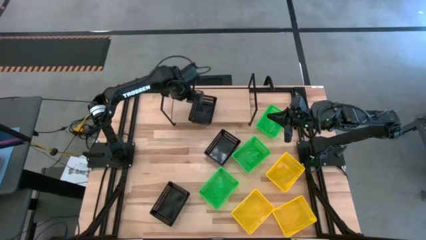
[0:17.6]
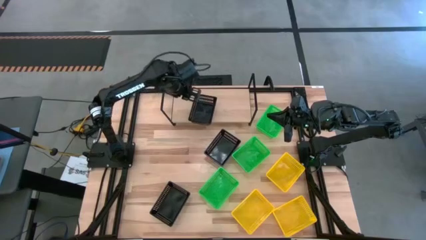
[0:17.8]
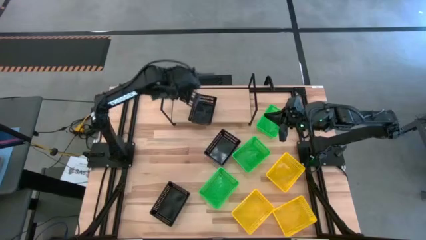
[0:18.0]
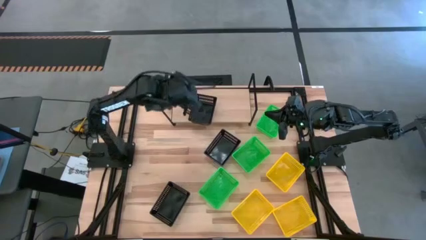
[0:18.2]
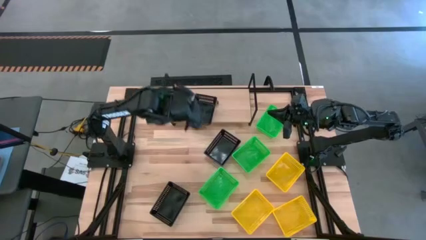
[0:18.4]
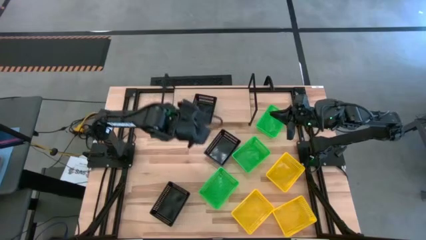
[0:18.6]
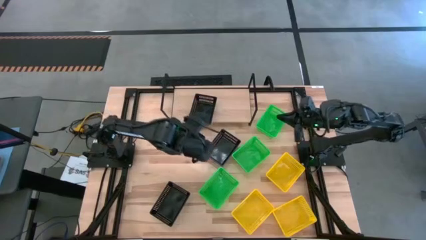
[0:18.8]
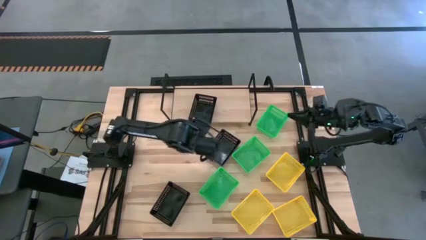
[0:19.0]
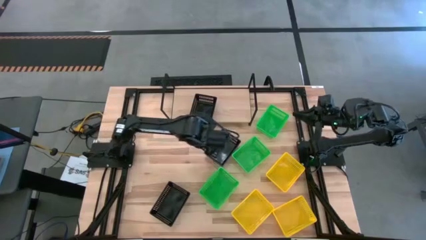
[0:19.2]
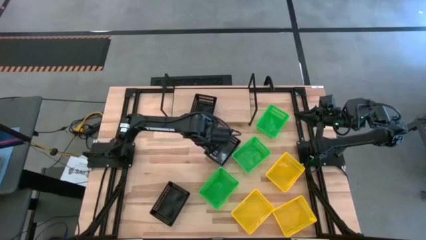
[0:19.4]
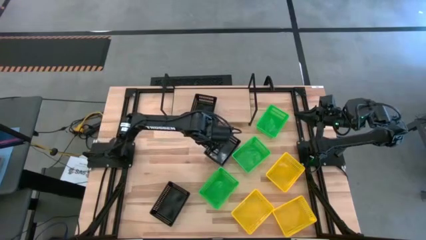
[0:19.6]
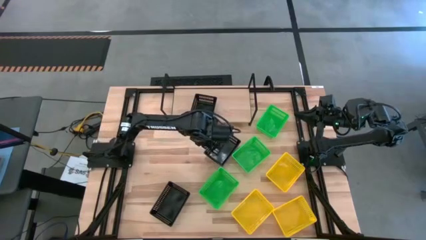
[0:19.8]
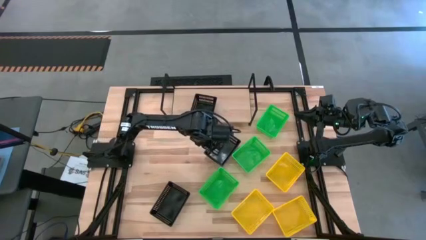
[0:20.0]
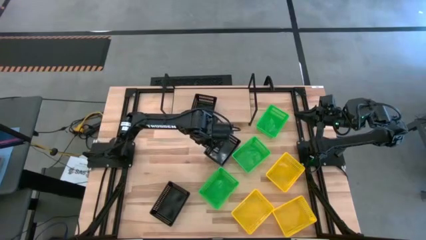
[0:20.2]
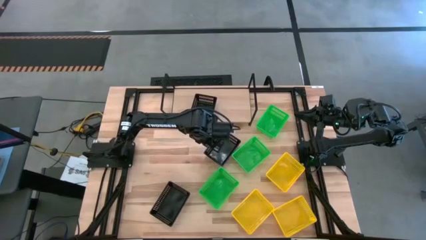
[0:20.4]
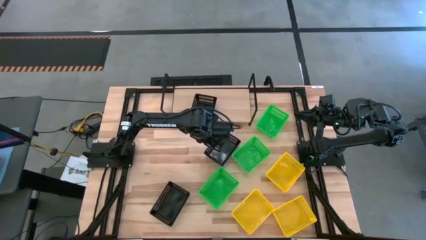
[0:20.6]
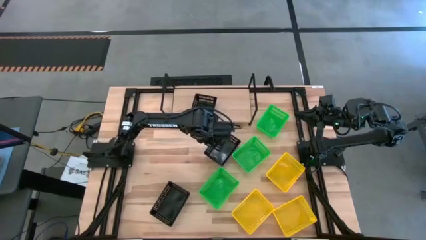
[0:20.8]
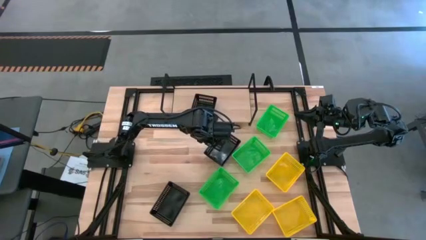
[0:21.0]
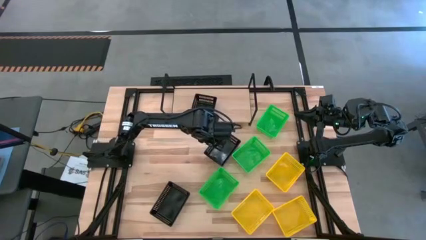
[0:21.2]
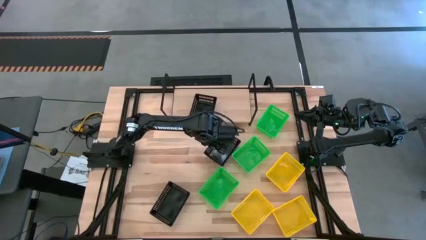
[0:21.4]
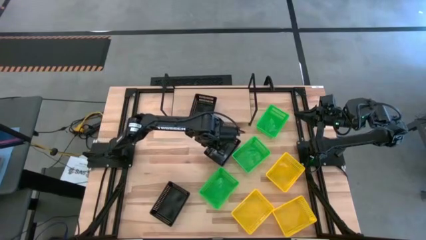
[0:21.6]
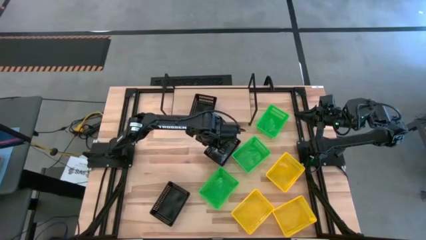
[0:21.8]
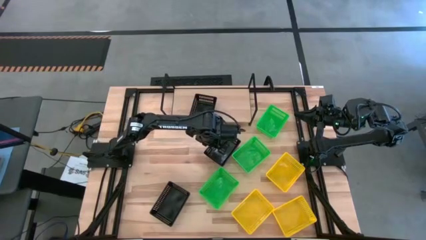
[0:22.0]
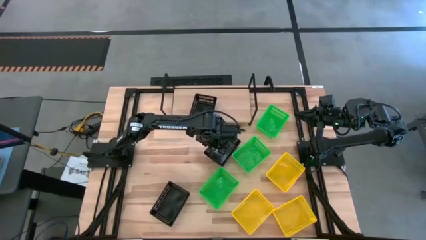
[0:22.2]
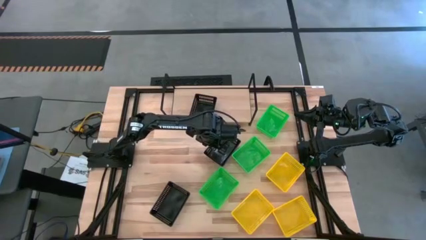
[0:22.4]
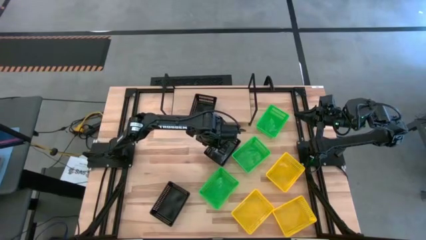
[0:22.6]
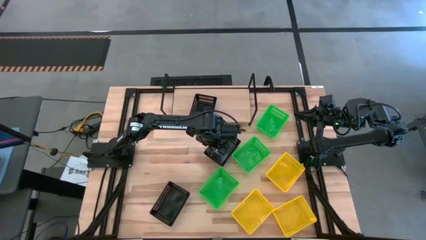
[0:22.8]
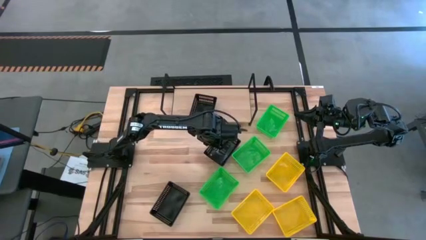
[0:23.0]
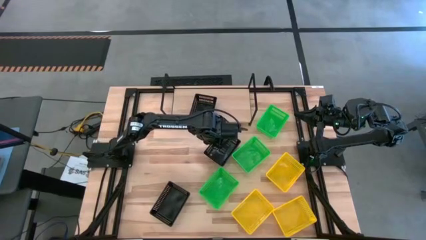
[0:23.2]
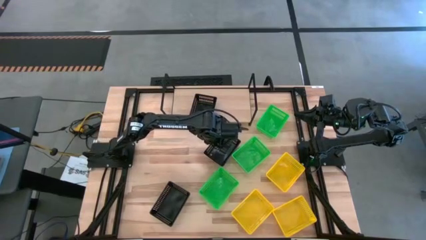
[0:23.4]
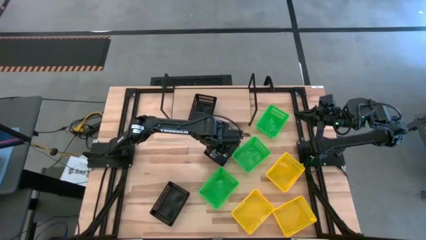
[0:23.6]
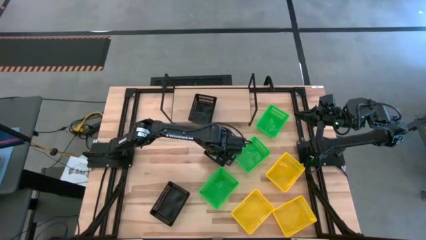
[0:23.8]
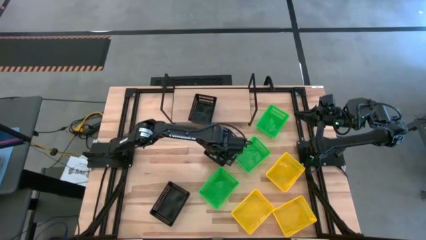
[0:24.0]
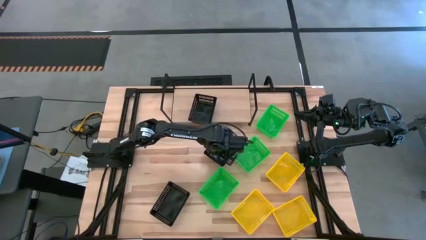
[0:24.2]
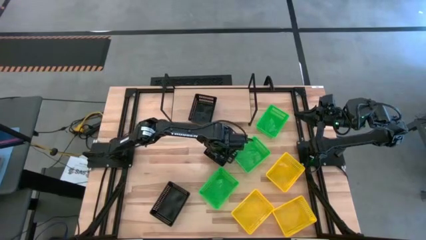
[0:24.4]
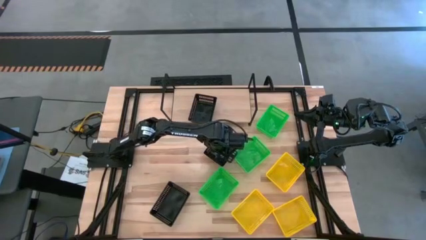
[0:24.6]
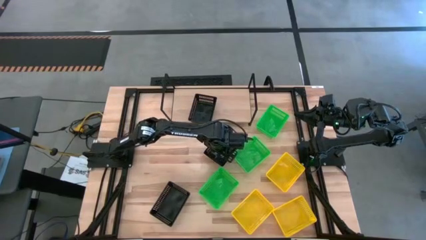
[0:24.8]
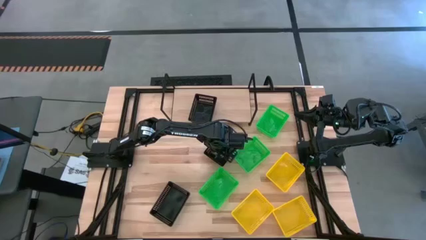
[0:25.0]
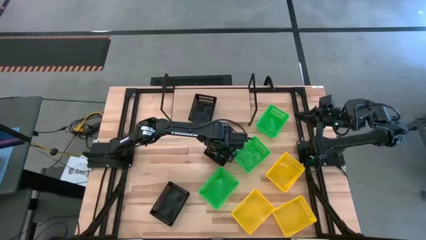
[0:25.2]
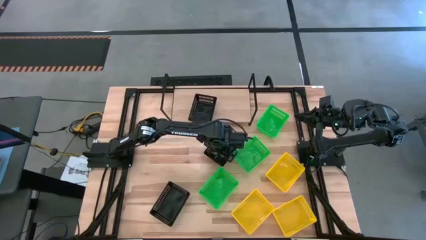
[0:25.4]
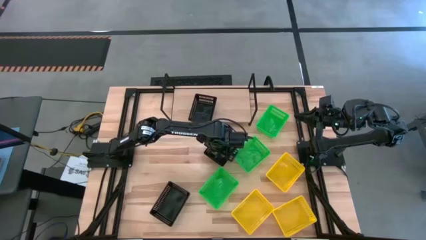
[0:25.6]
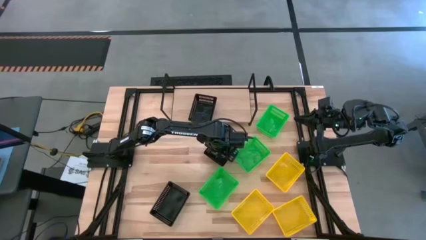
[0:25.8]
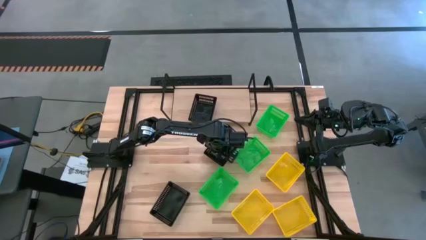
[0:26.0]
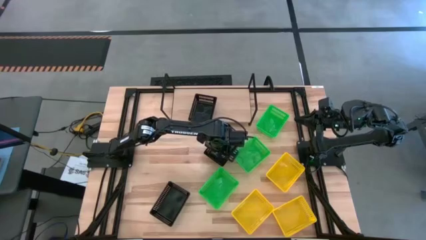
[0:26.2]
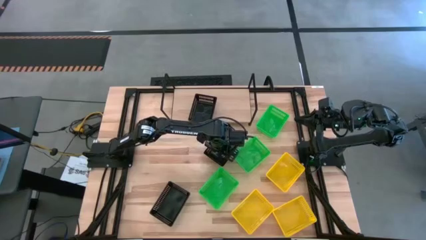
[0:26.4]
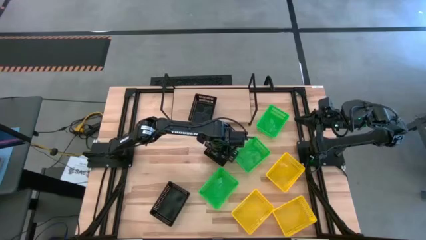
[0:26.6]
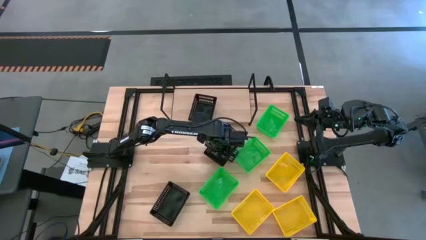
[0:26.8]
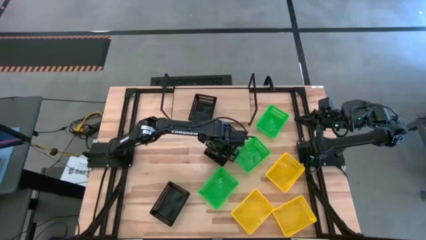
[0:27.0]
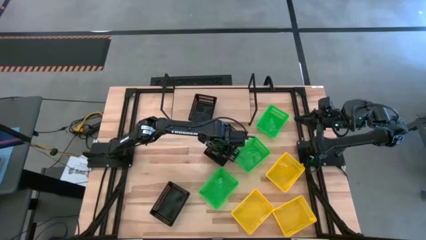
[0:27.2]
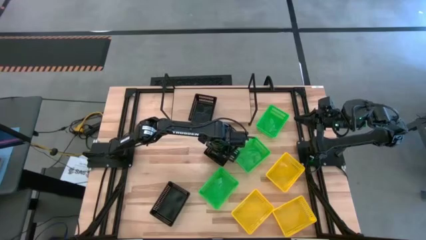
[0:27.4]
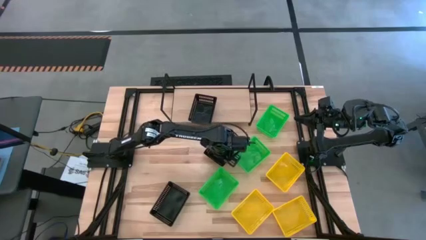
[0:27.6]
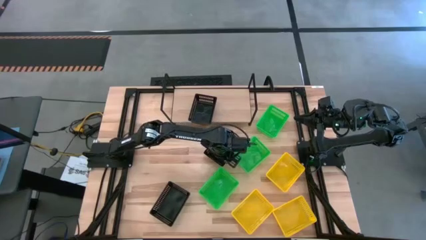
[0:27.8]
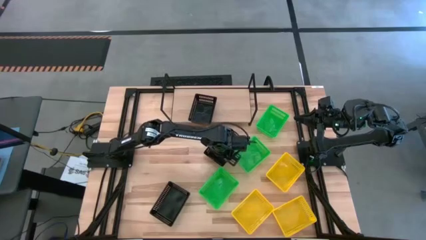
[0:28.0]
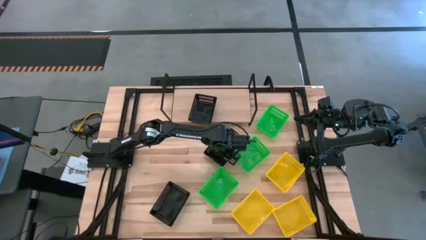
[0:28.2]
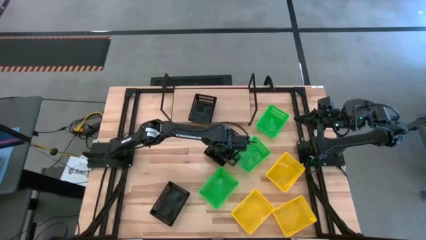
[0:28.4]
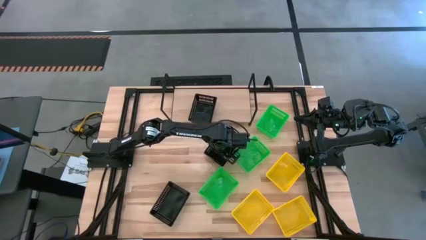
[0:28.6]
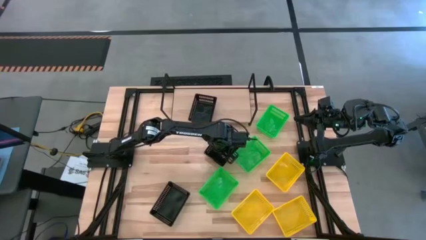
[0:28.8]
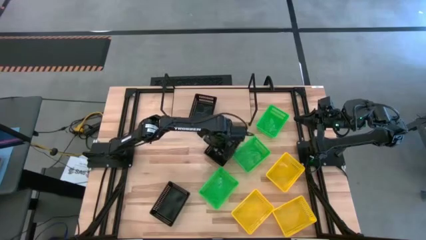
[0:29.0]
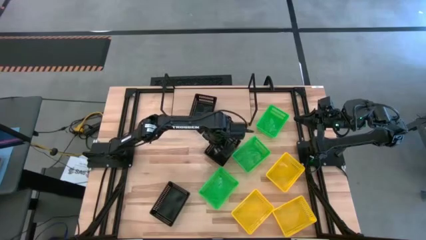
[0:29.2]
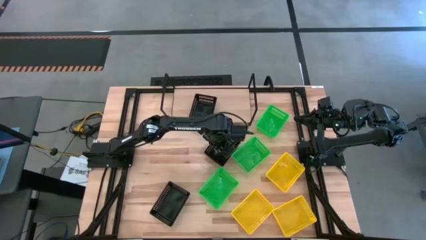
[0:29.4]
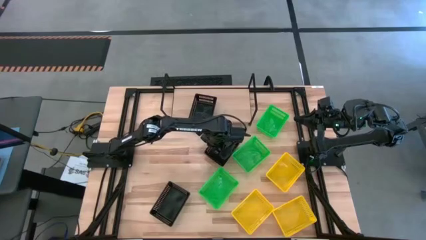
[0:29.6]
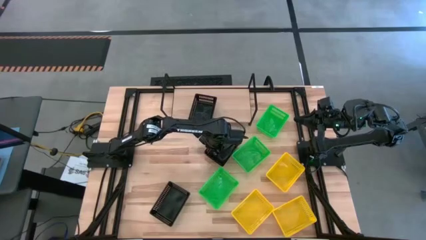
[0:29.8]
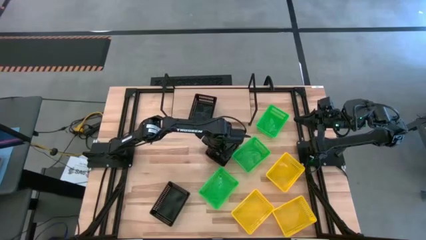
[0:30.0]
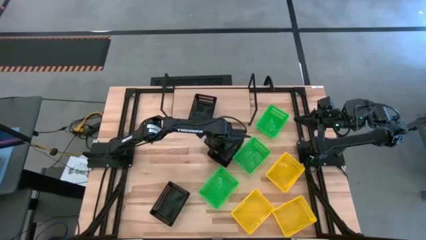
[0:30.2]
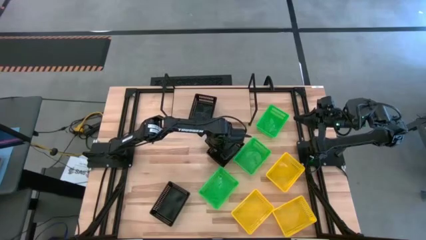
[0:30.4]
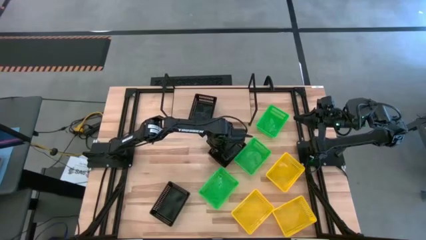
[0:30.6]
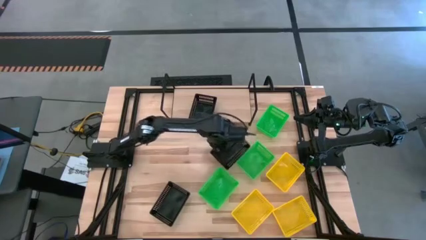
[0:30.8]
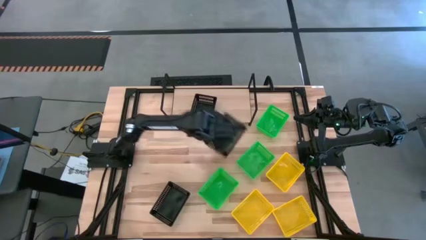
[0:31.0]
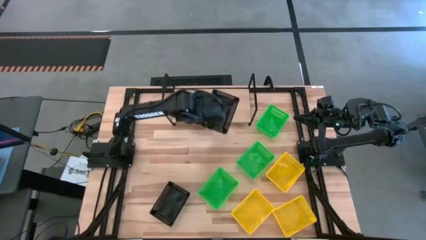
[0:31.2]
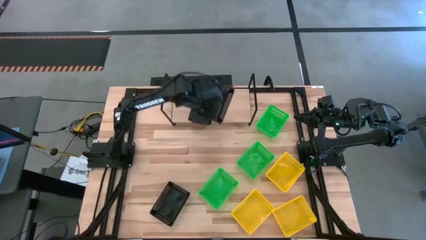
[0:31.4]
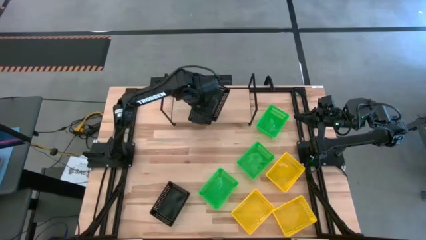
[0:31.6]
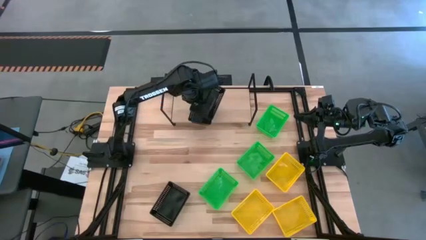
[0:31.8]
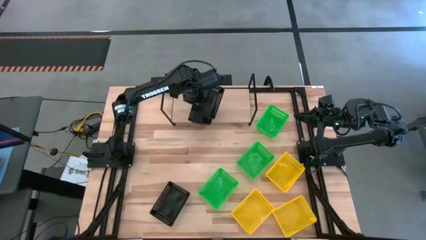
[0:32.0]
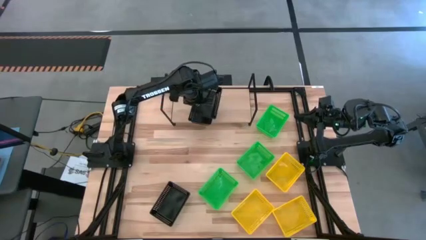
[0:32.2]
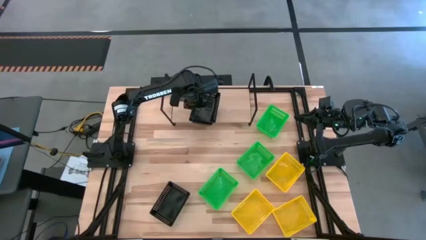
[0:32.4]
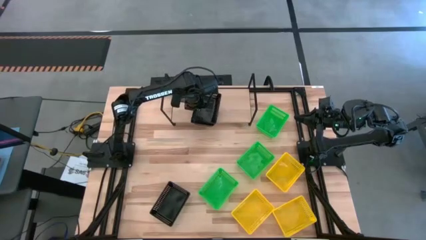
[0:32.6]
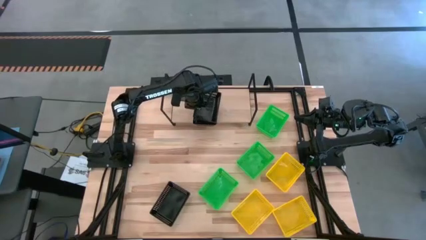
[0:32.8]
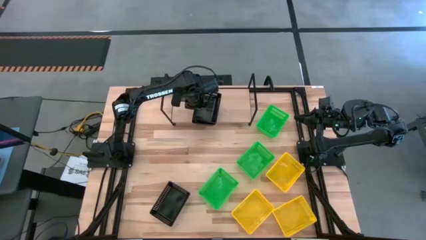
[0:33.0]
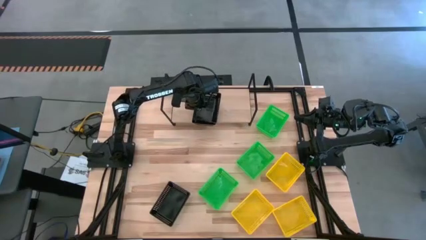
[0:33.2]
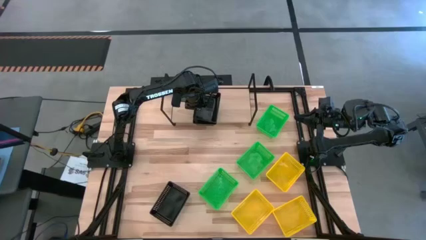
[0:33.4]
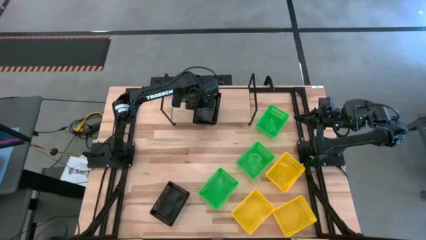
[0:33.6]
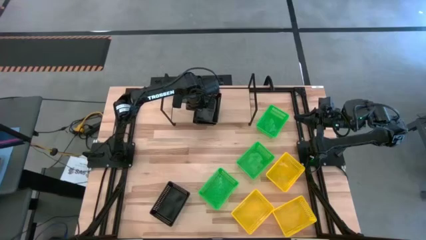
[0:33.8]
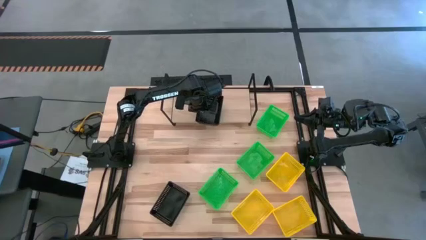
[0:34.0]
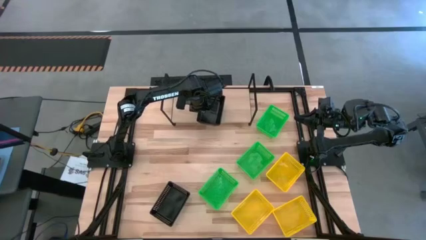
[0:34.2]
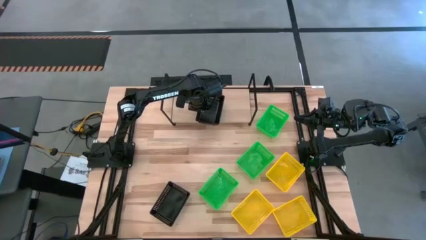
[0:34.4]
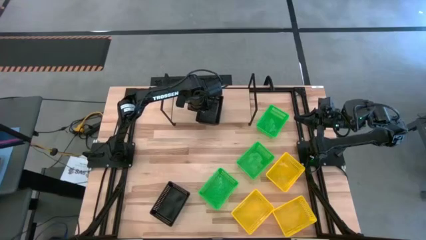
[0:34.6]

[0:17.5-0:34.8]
Task: Stack baskets on shelf by color
Stack the top black bin on top of the black bin on the shelf
